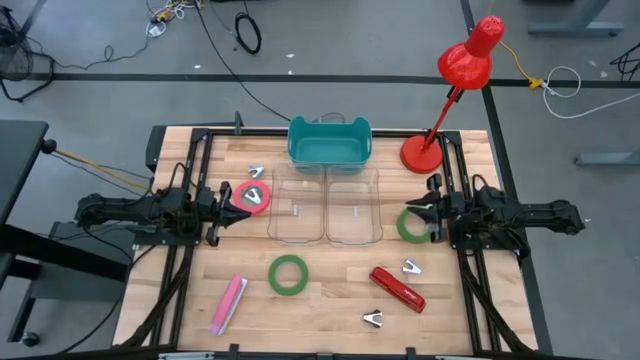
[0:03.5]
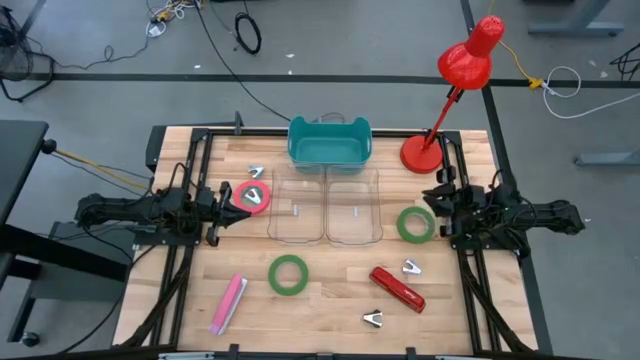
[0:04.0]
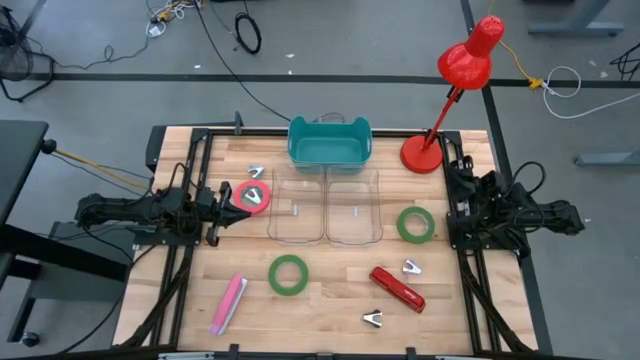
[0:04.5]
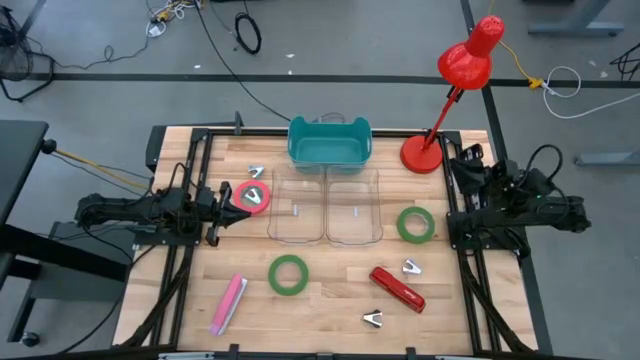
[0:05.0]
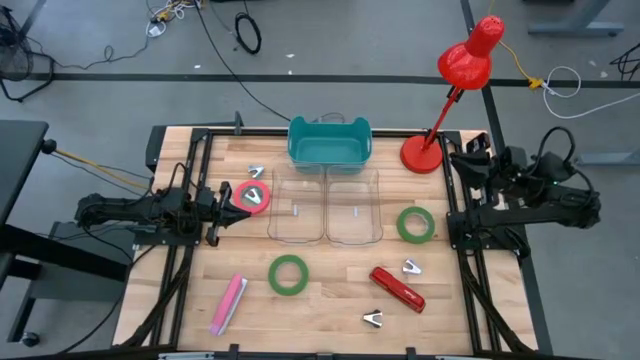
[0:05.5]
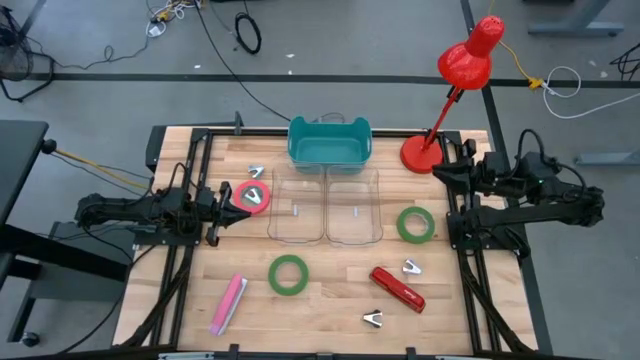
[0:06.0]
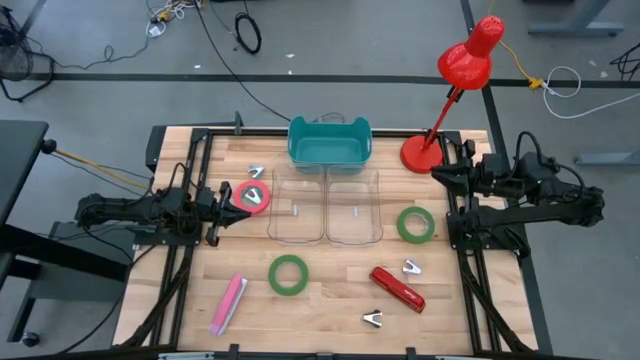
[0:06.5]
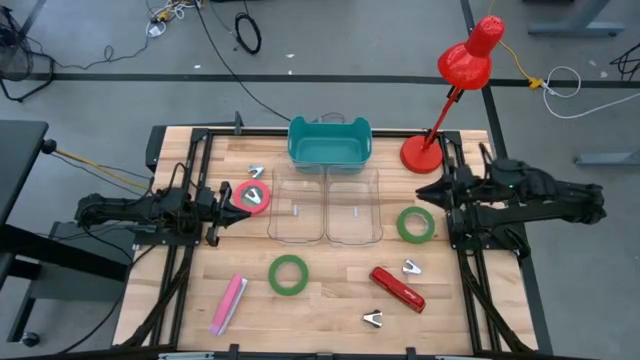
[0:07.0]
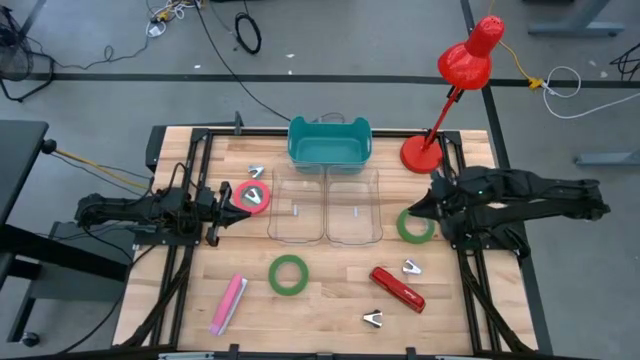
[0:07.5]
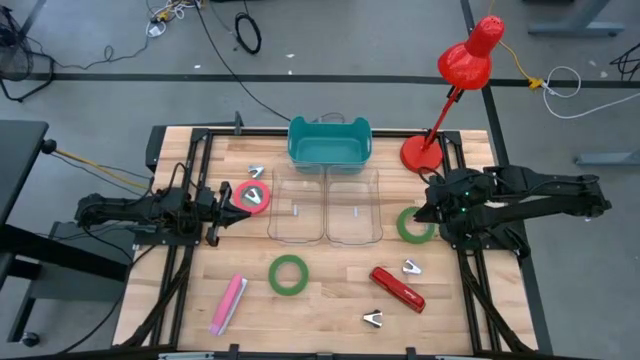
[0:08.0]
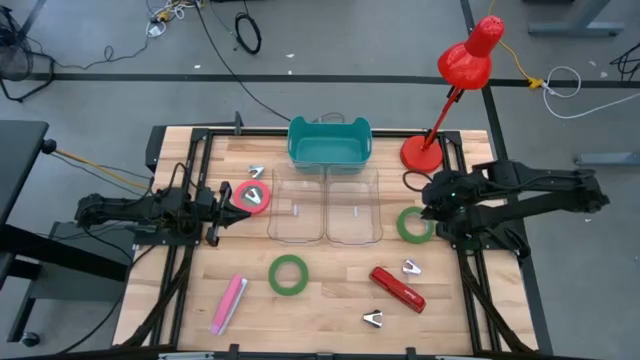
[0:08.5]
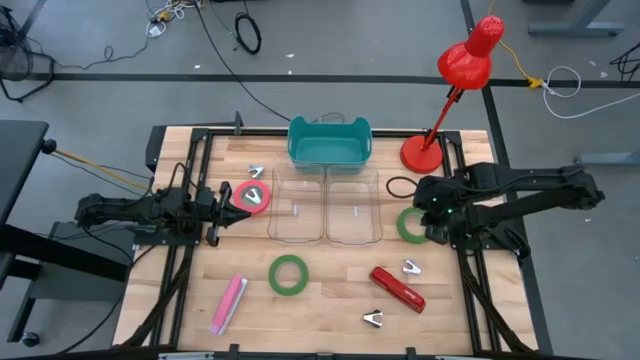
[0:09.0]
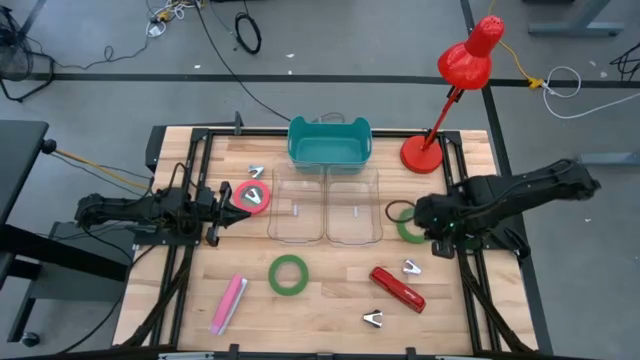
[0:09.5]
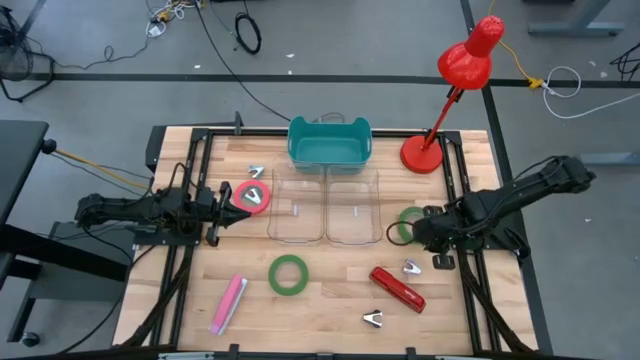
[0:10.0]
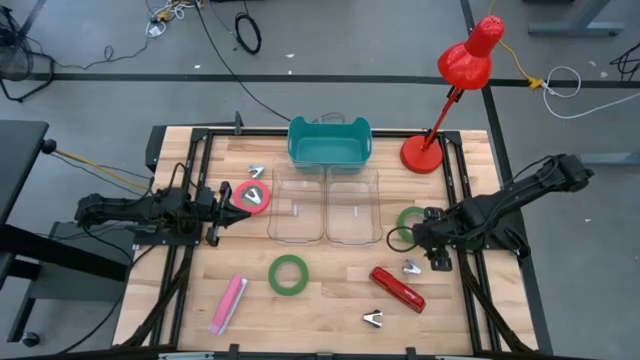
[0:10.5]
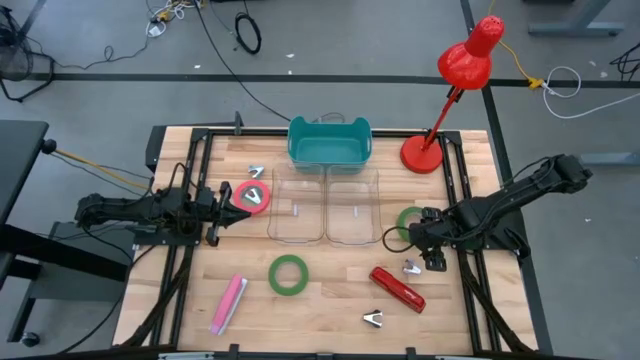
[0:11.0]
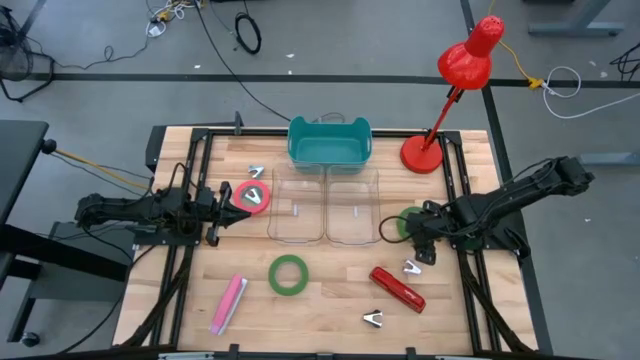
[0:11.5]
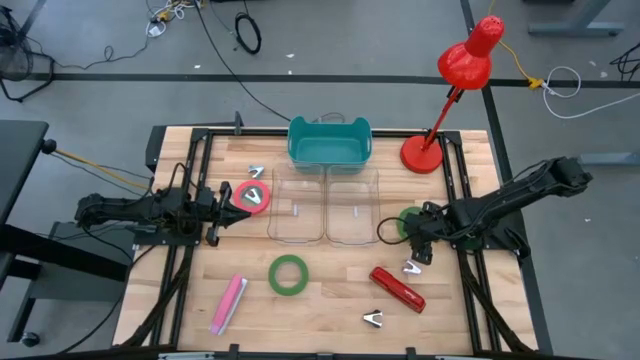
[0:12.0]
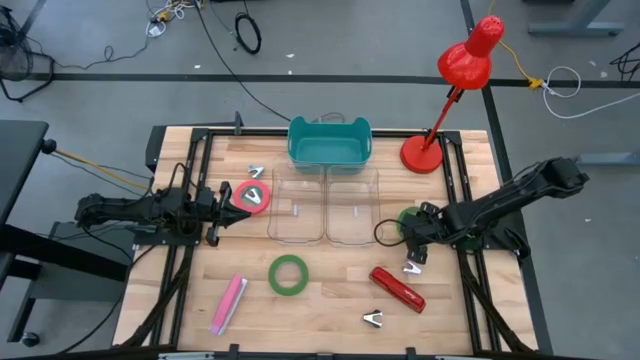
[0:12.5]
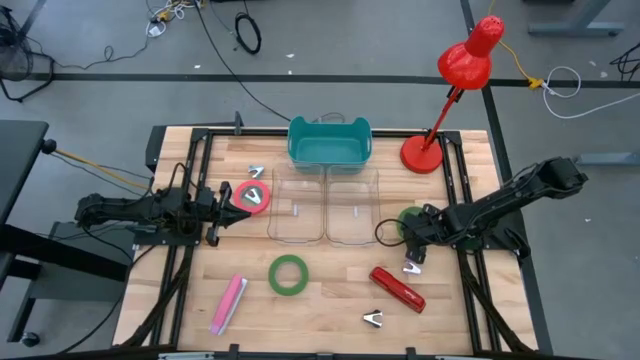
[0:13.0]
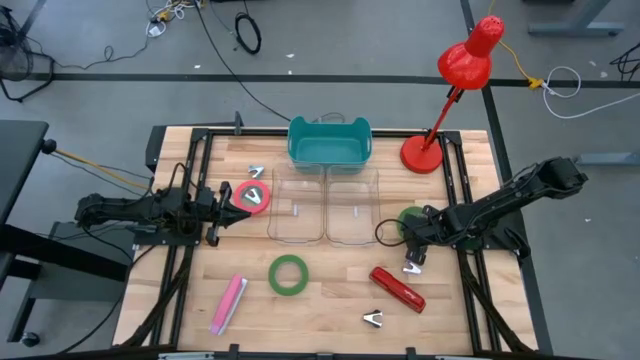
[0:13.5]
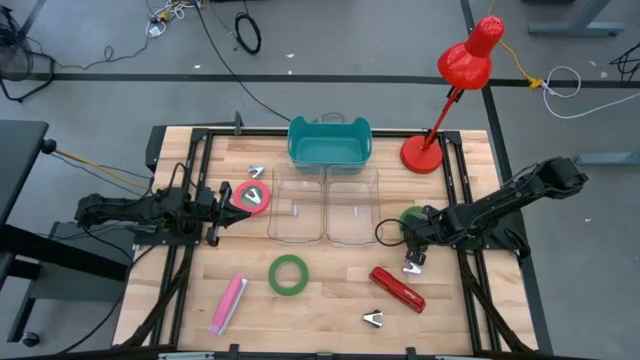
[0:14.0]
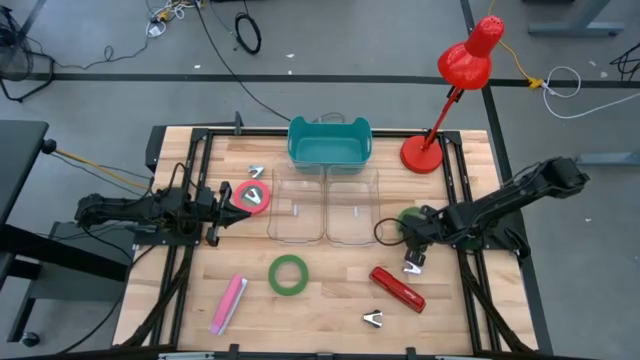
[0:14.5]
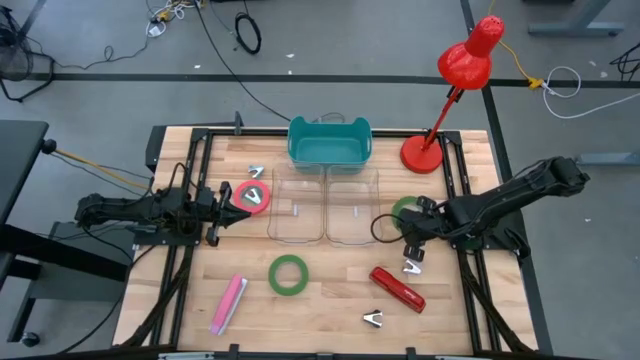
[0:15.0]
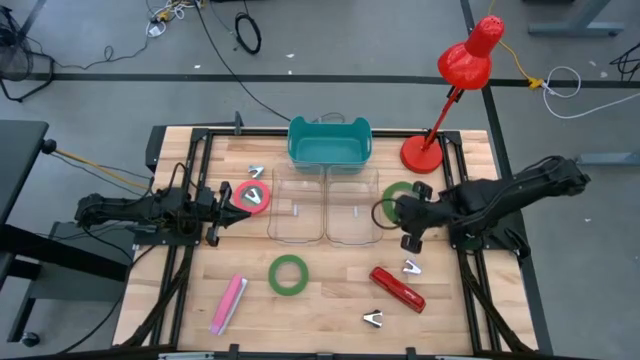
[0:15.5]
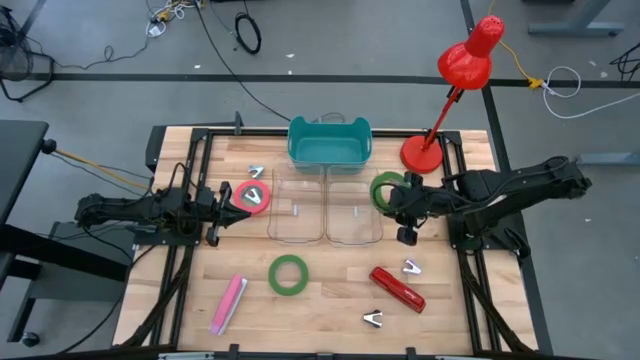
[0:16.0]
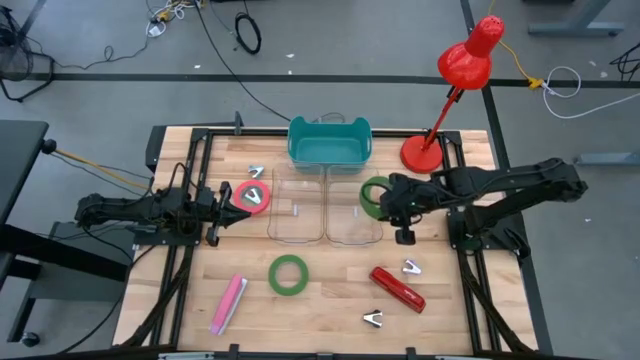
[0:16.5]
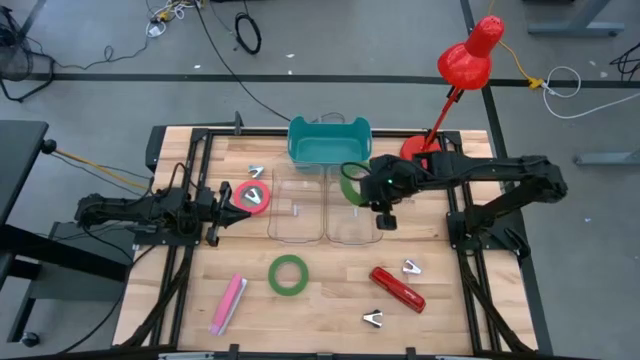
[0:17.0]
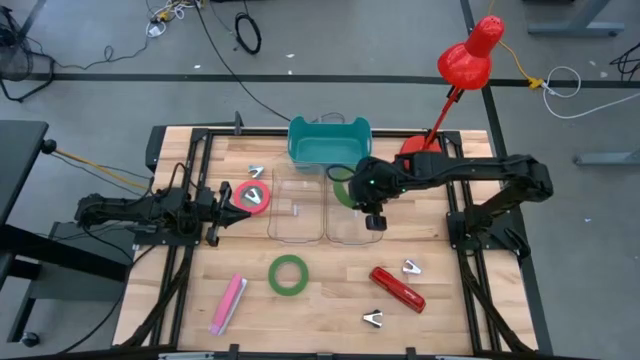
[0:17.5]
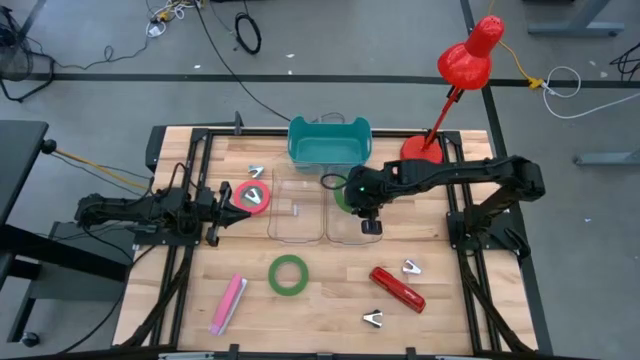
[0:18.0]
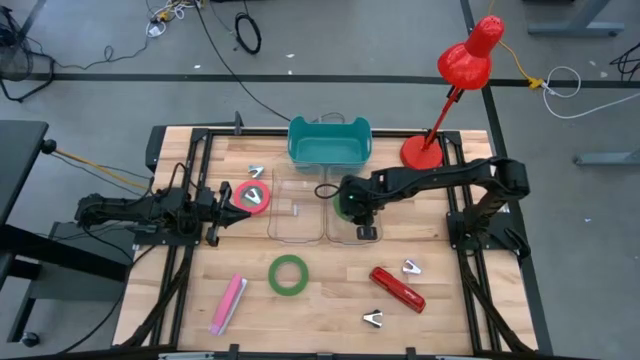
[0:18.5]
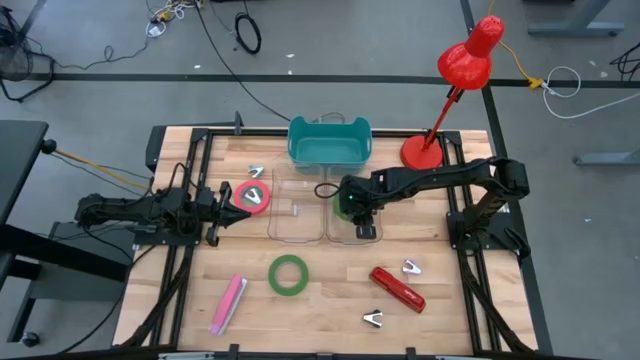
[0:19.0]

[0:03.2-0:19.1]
Task: Pick and place Stapler, Stapler remover, tape
Put the top green tape into the right transparent bin

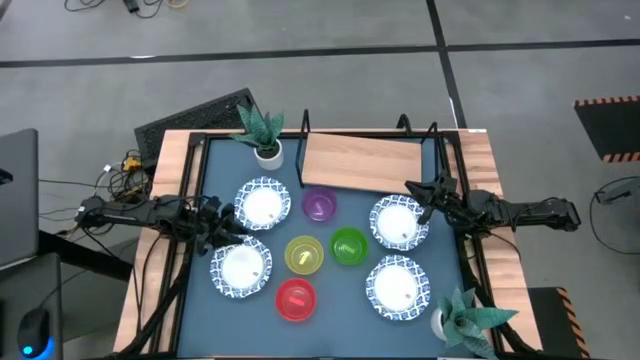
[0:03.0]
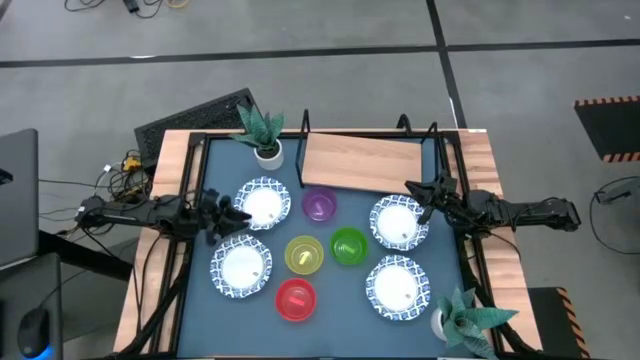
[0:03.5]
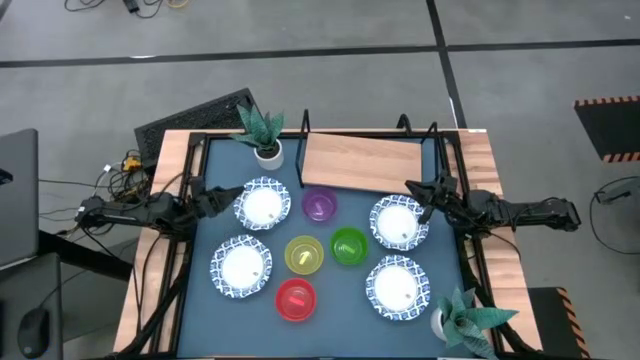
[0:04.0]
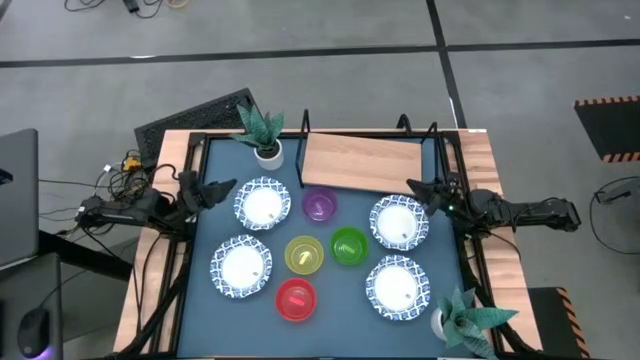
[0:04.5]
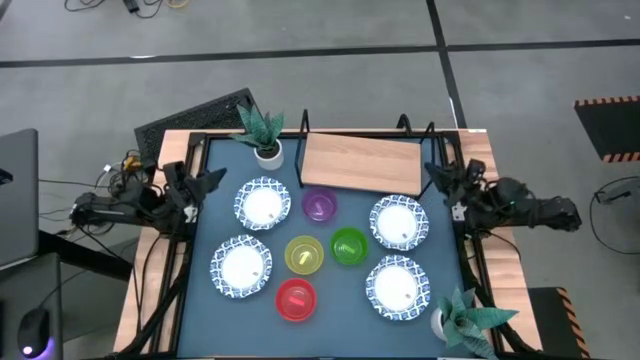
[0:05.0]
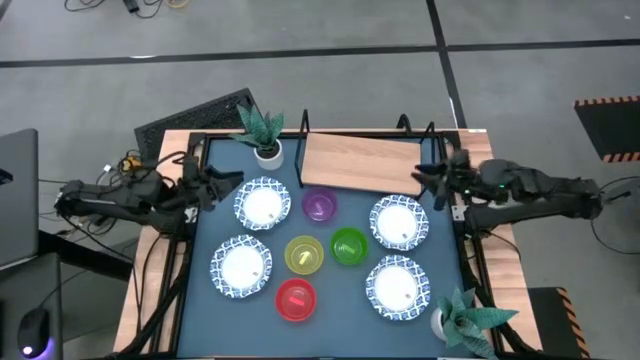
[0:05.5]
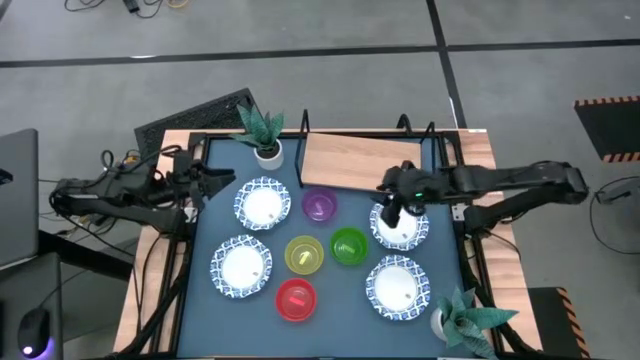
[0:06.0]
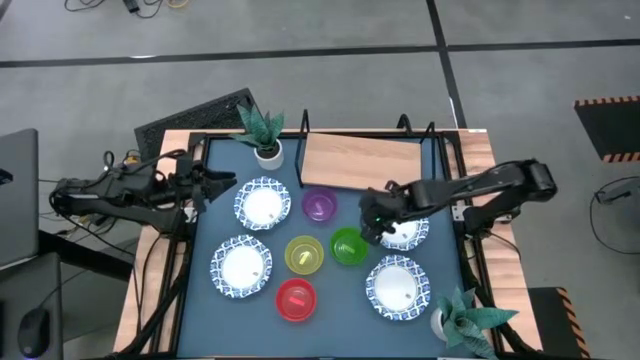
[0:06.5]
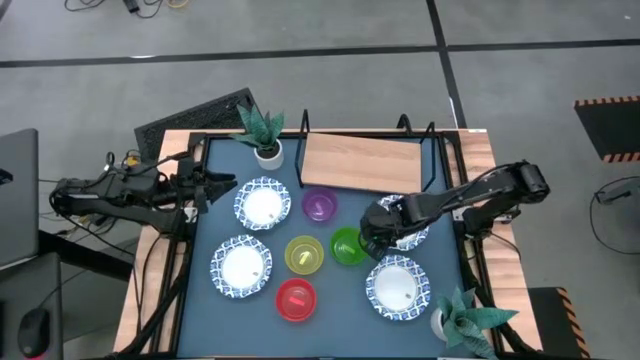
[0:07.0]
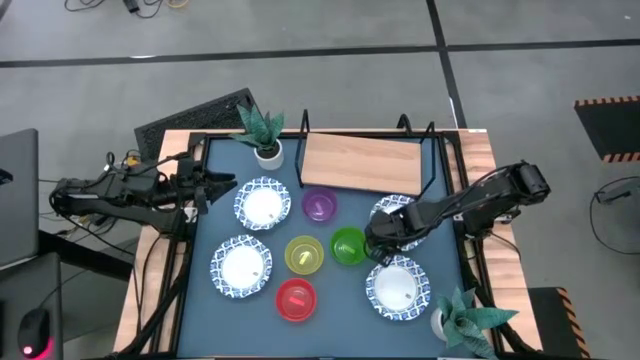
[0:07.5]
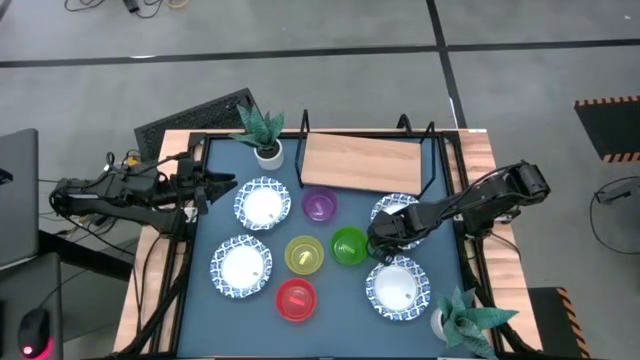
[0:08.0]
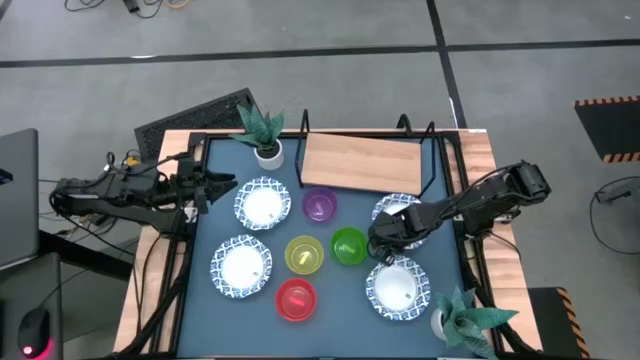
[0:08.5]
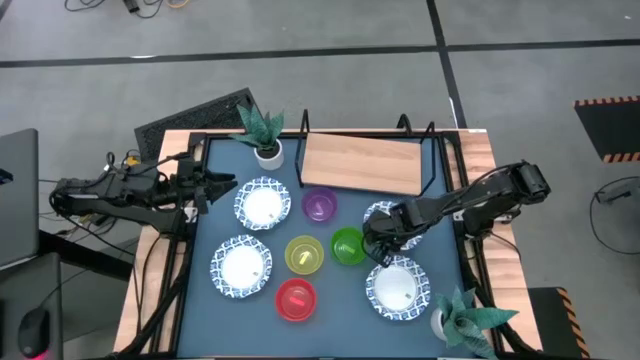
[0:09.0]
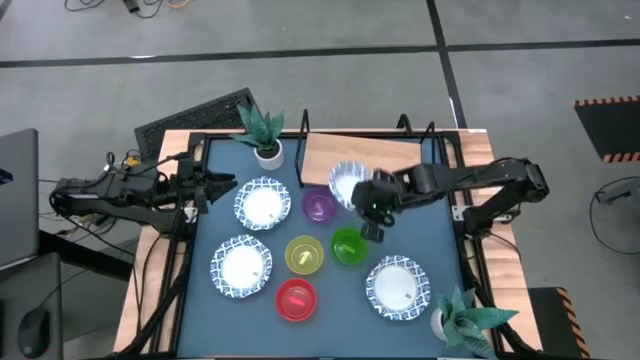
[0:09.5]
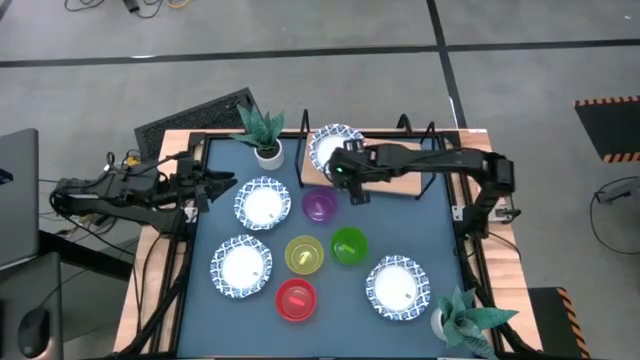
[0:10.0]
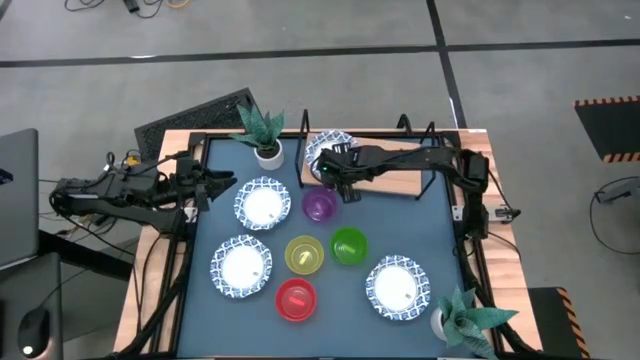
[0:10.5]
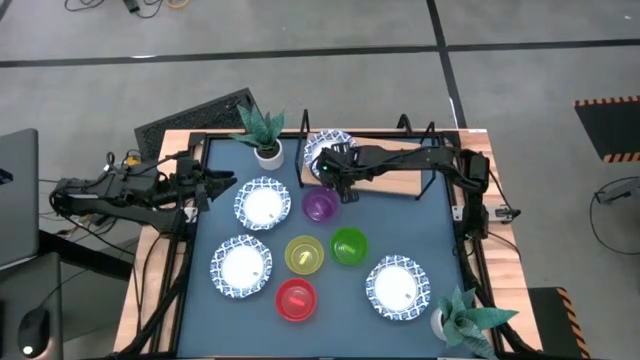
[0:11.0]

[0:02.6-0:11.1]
Task: Place and stack bowls onto a shelf
Put the white bowl on the shelf
